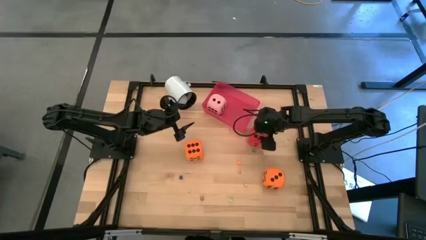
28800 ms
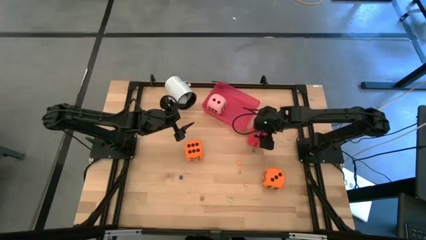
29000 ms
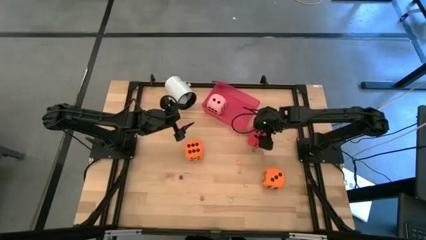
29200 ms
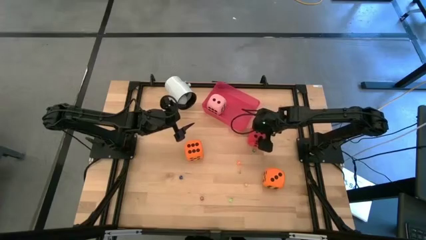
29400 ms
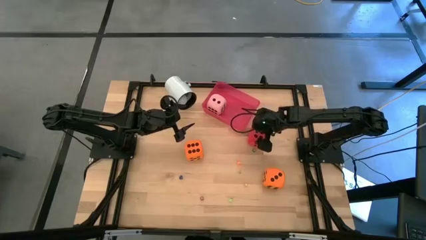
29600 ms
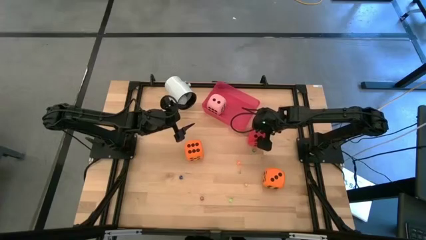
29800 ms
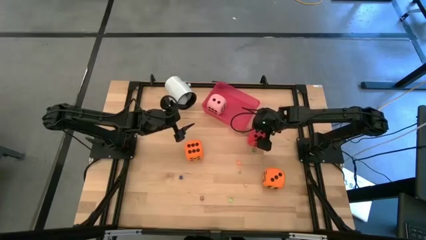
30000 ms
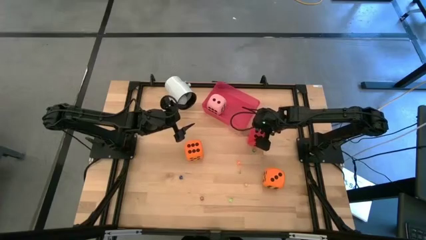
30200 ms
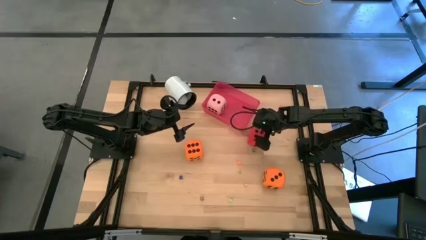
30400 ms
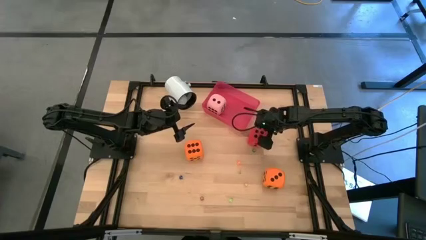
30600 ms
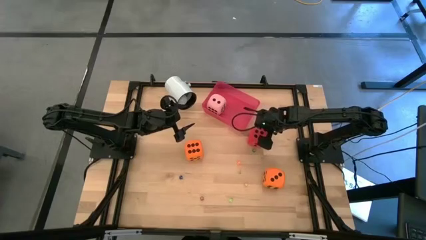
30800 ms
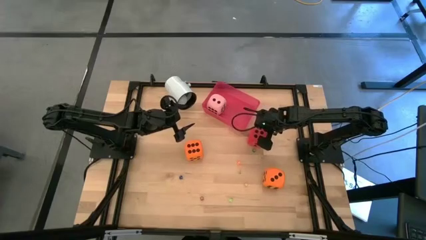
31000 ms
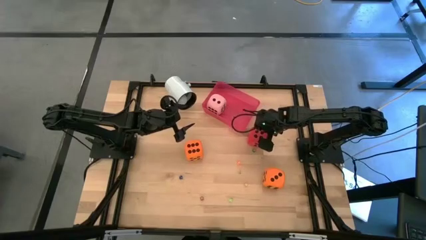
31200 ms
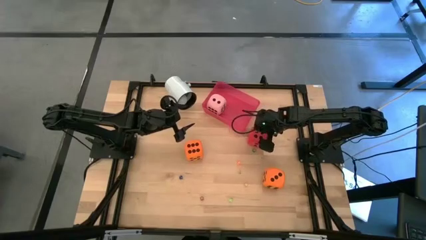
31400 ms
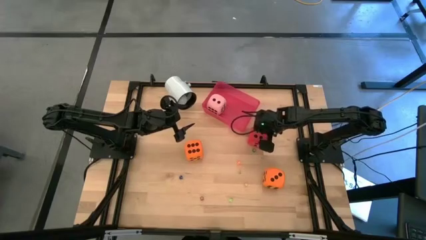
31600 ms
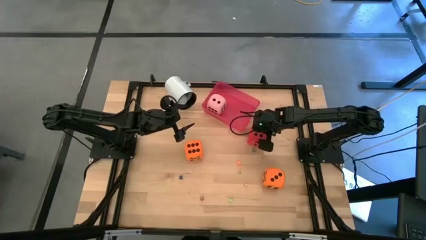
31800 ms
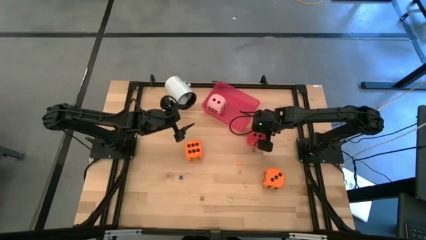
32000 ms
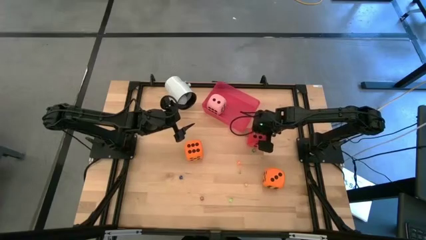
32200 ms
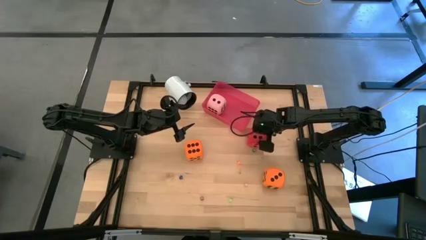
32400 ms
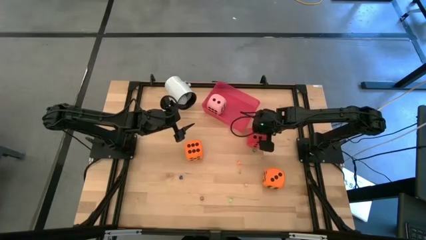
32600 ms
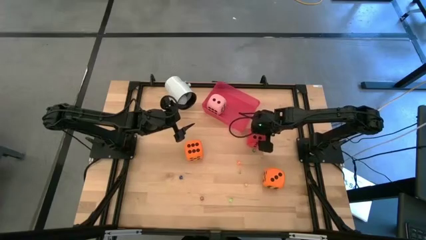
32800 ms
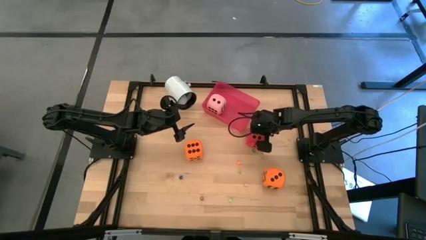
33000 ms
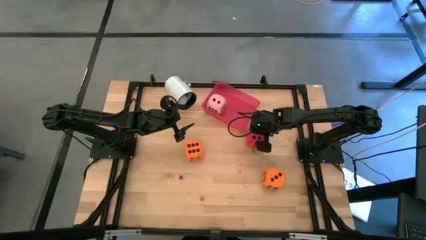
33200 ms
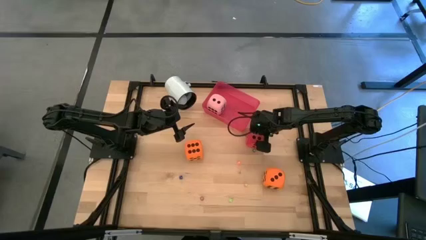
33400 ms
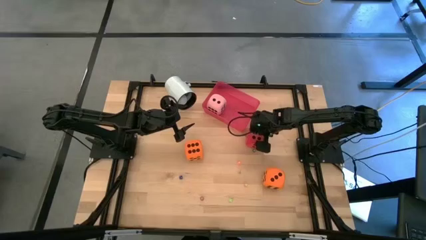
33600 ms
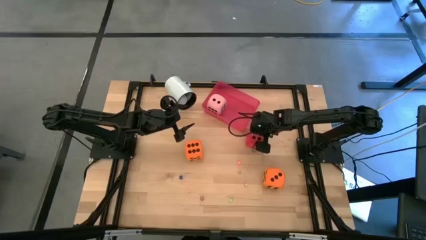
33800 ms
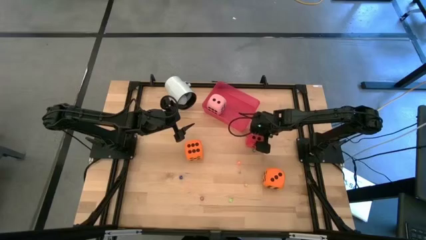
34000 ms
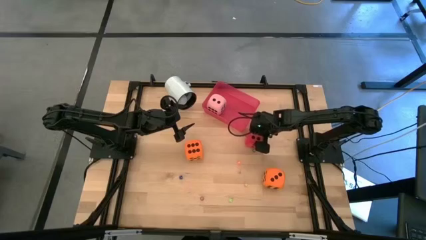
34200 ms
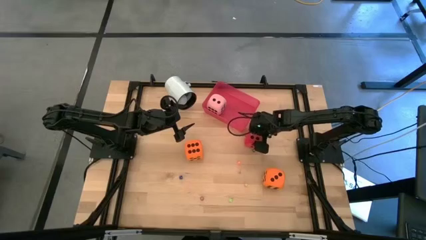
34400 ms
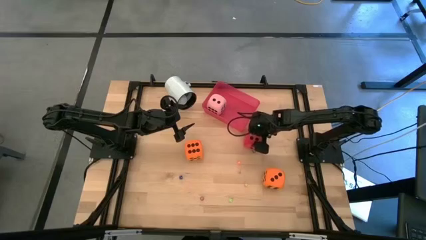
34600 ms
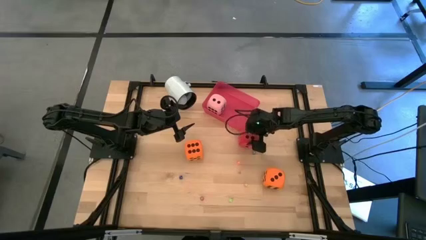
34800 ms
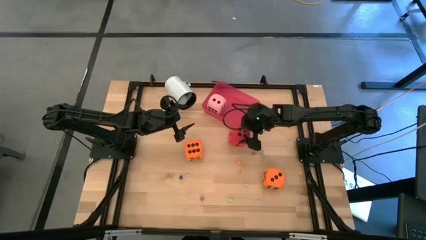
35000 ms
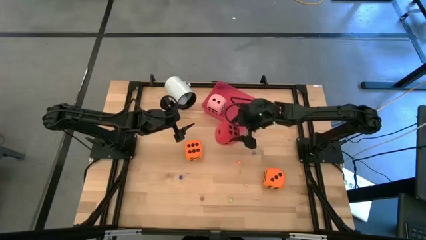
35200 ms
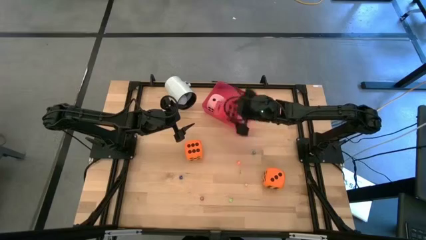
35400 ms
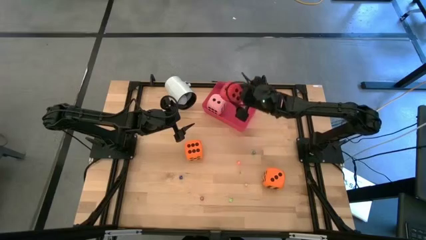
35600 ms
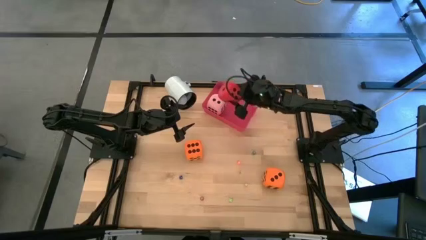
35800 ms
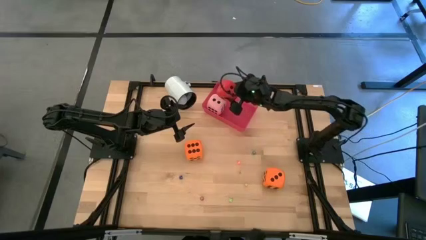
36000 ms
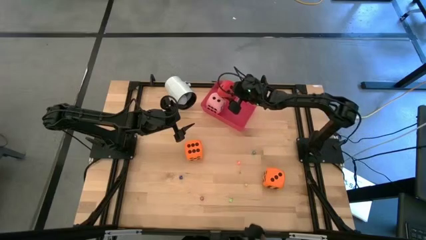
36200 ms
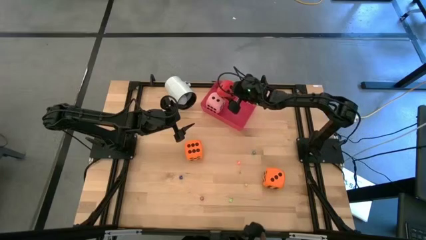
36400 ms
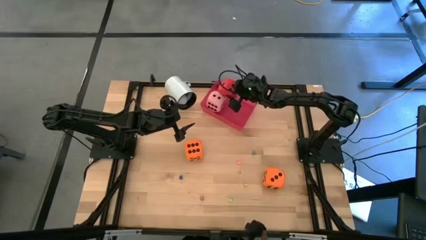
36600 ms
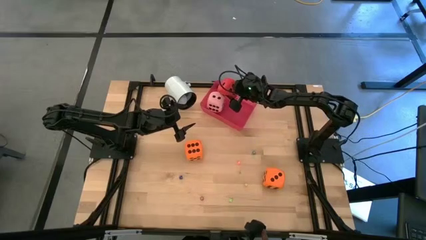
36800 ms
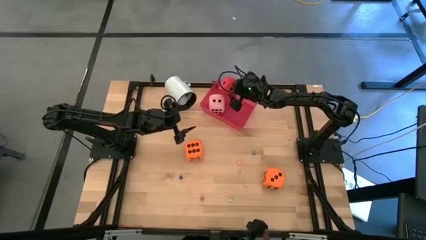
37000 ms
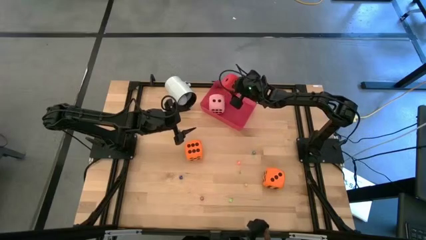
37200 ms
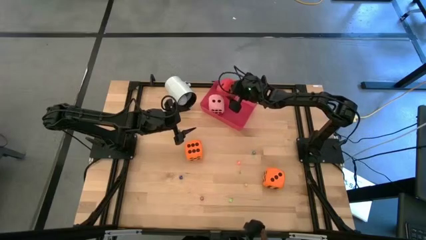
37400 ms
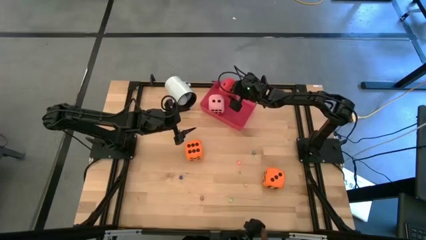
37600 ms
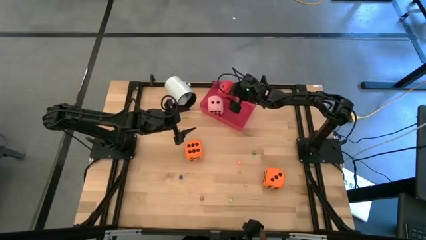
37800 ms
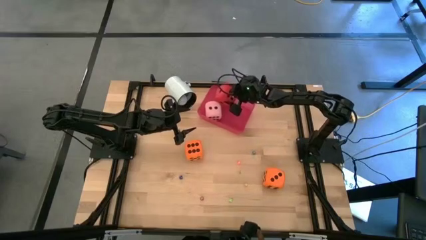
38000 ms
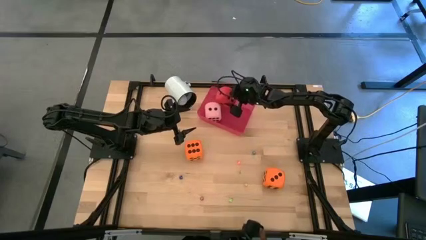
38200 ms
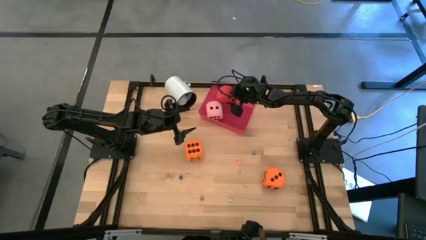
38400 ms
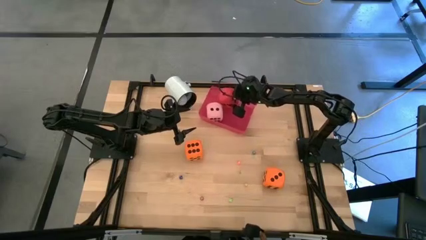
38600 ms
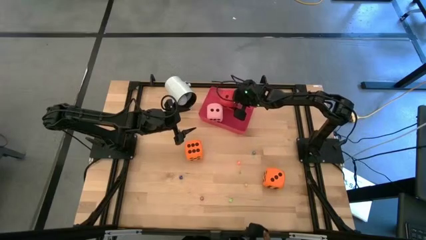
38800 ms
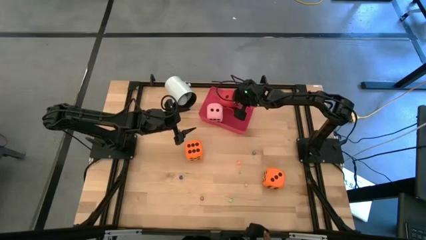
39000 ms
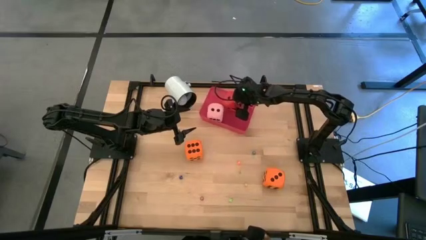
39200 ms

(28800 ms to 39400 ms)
Task: Pick & Place Dice
Put the big red die into the red bin

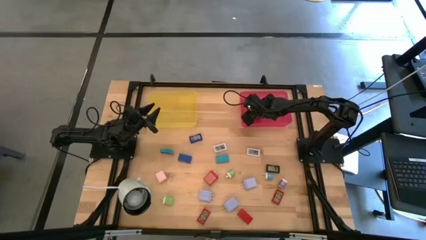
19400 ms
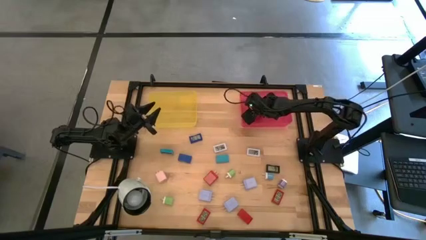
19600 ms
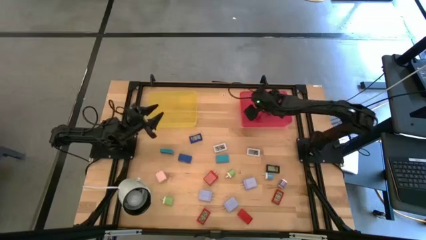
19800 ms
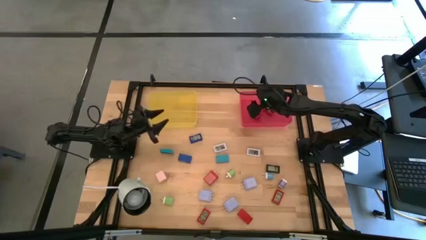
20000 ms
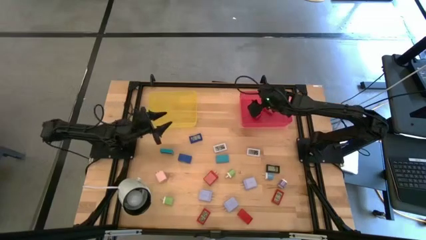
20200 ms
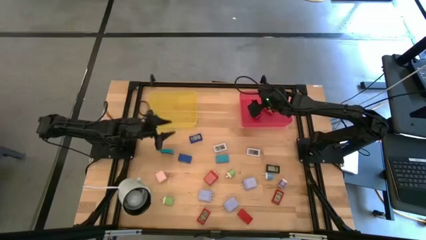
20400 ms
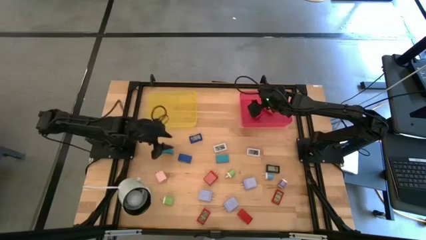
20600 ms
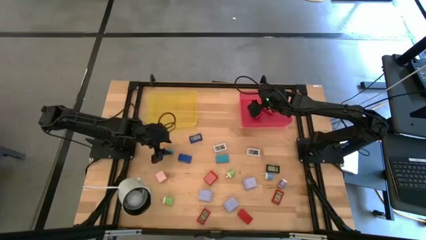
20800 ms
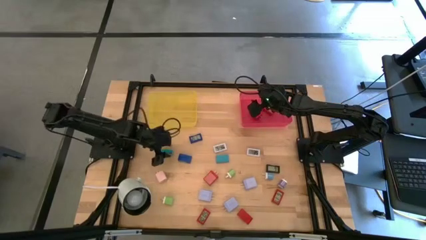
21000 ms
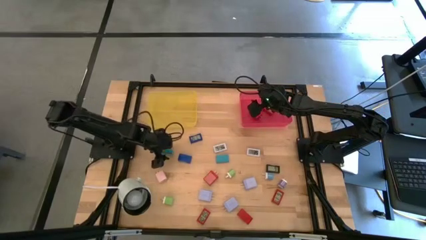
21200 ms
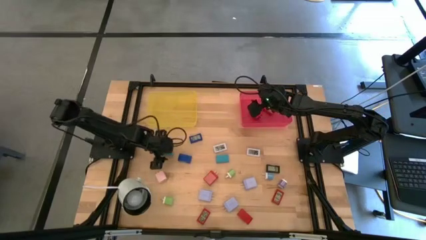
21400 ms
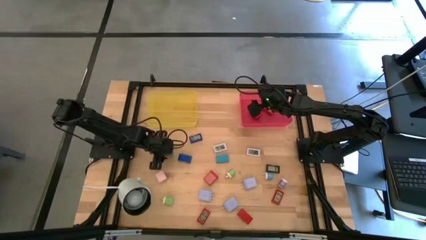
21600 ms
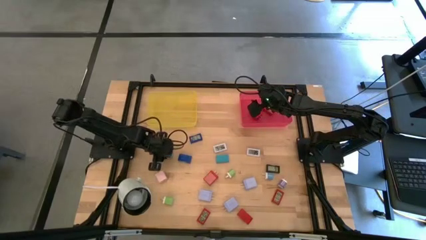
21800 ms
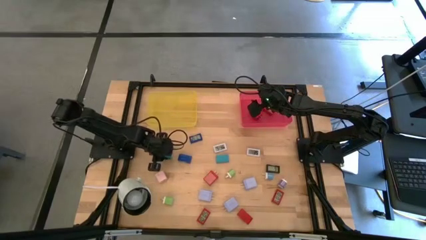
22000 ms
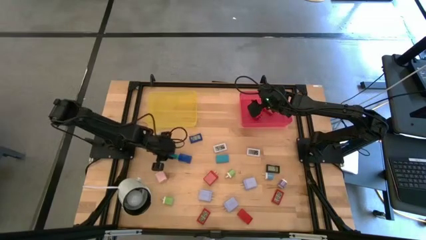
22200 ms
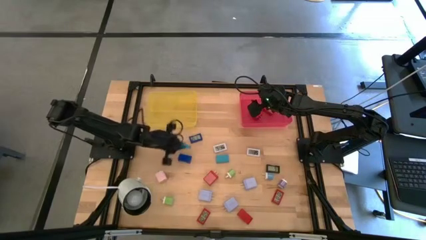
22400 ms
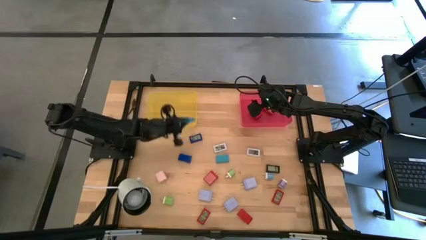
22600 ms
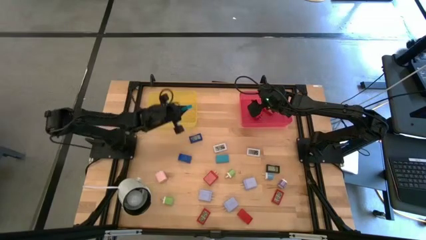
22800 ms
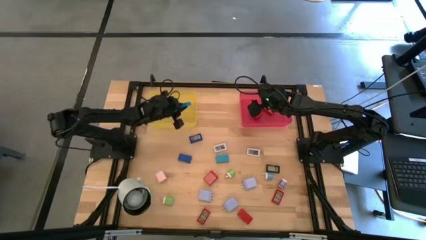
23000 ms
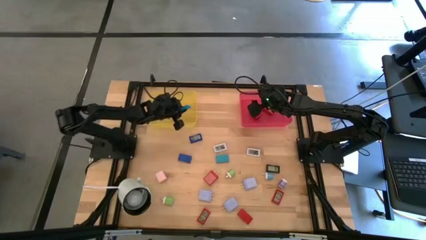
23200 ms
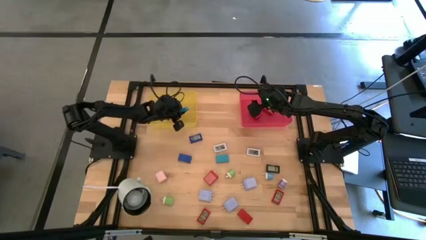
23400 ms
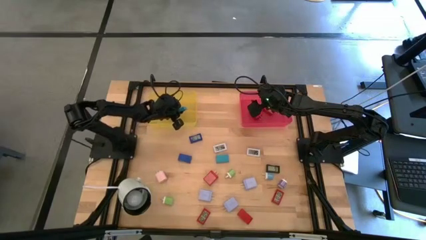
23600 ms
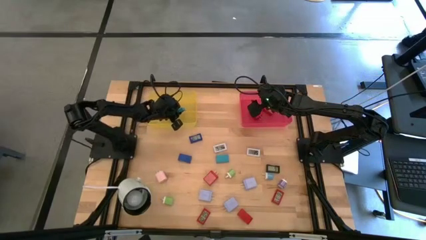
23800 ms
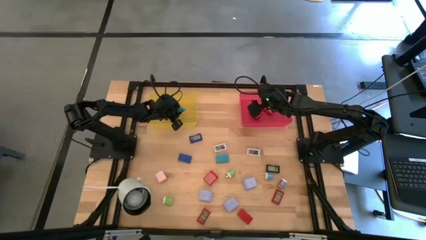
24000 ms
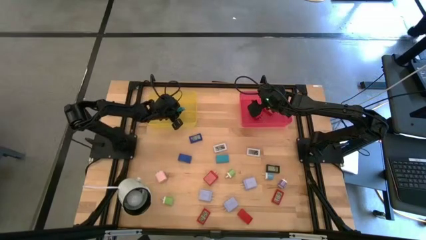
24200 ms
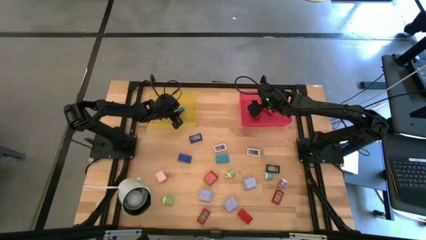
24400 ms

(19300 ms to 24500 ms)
Task: Pick & Place Office items
Put the left light blue digital clock into the yellow bin
